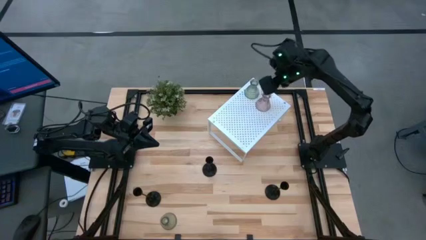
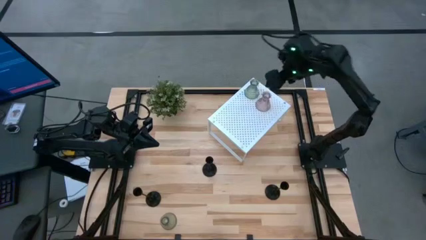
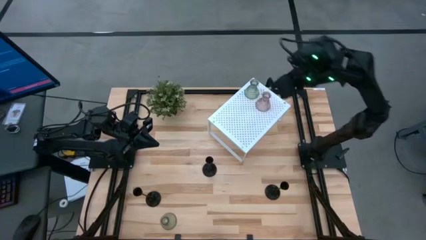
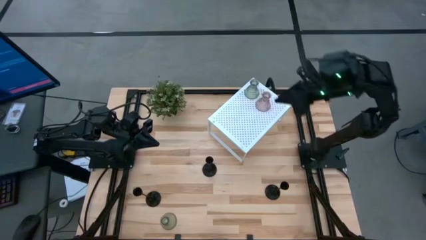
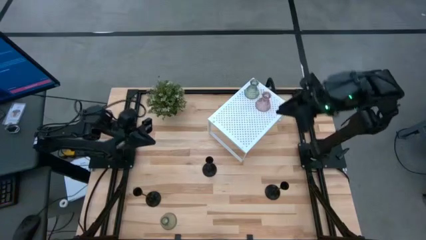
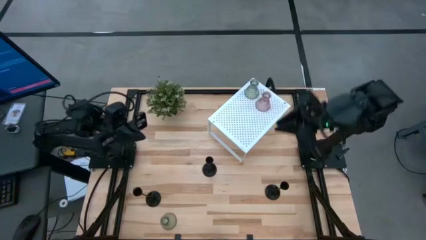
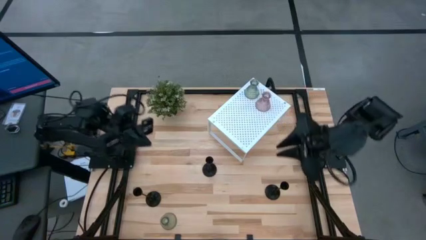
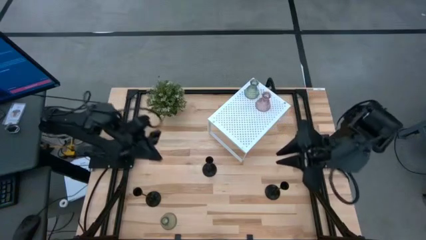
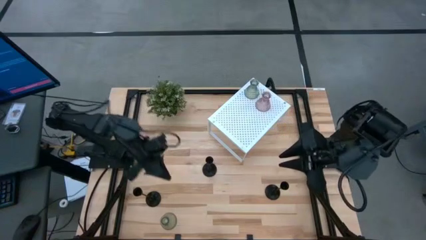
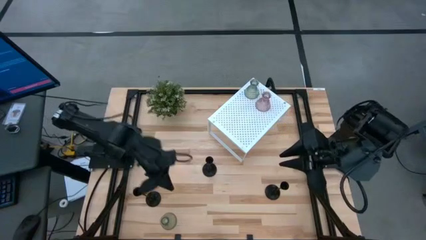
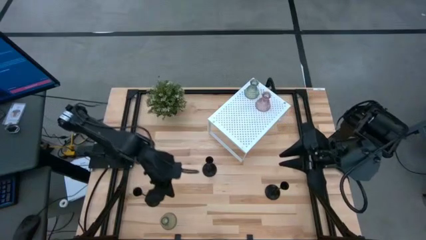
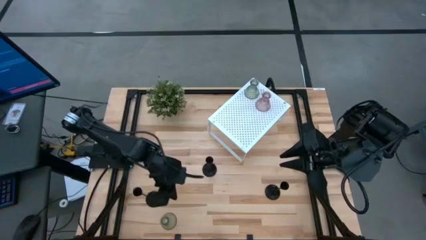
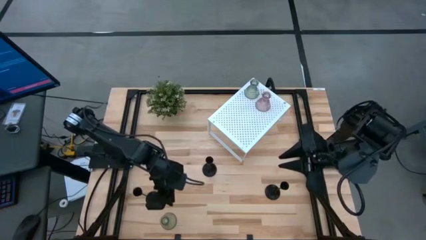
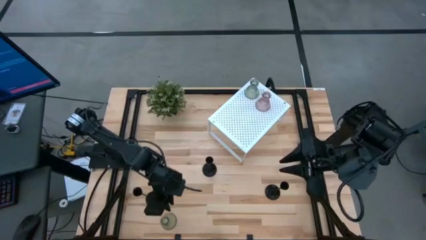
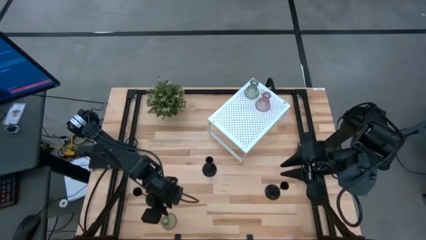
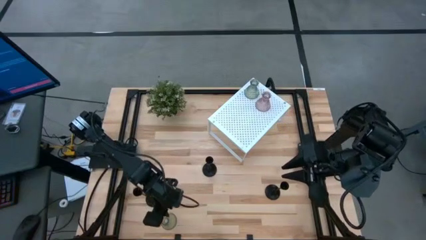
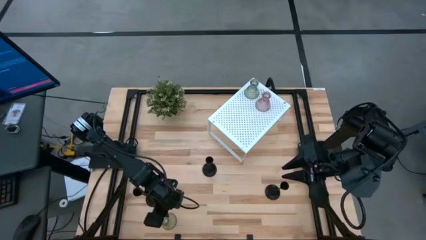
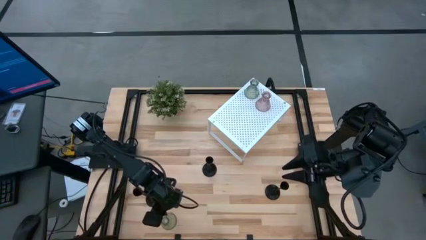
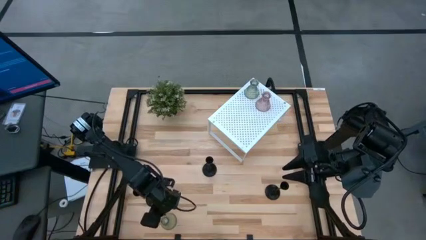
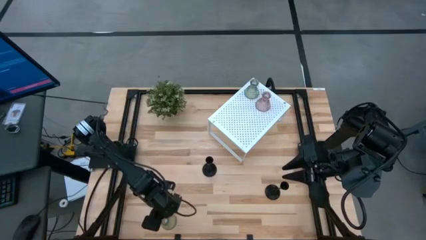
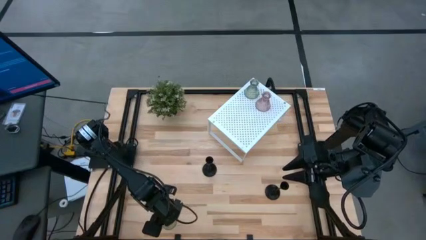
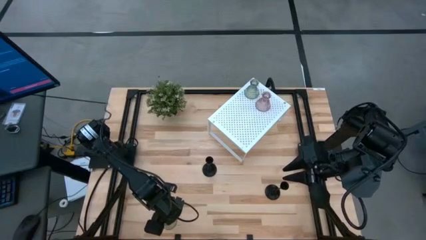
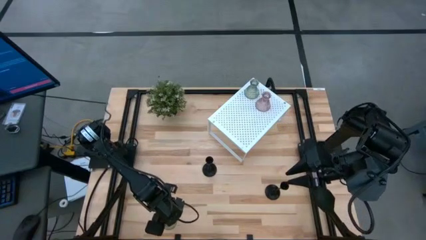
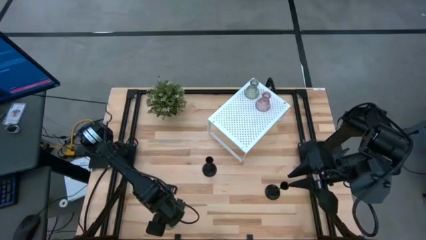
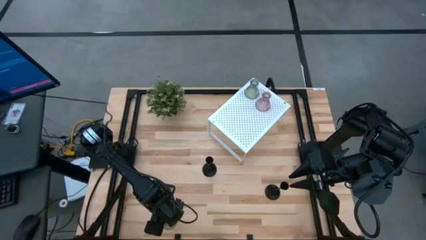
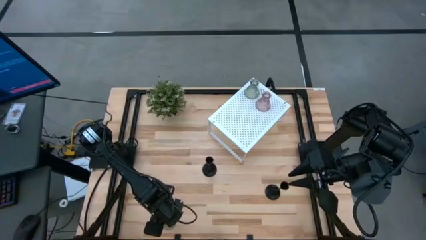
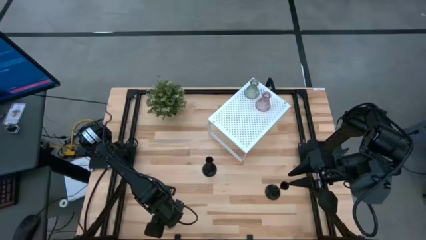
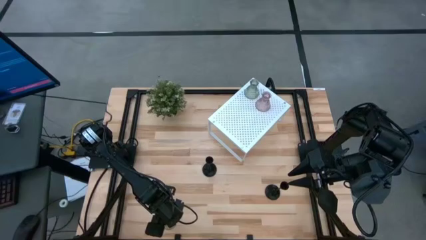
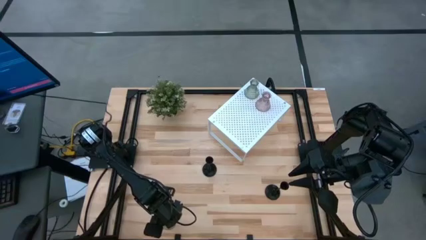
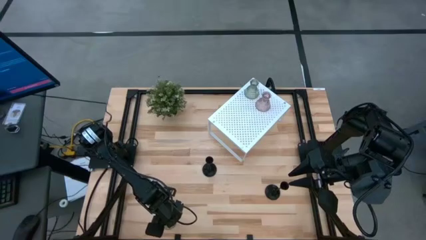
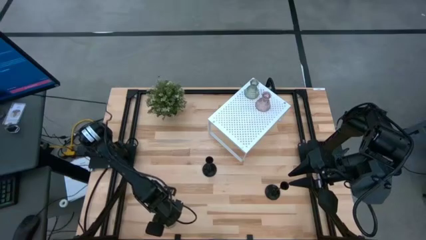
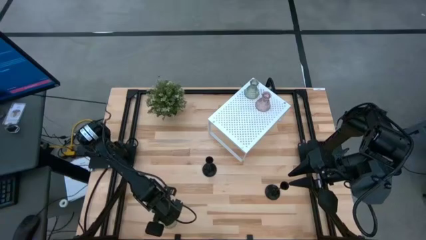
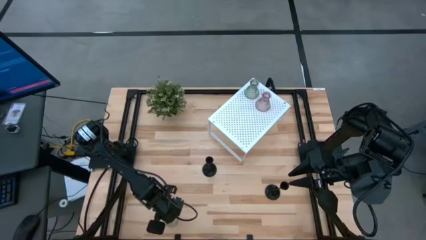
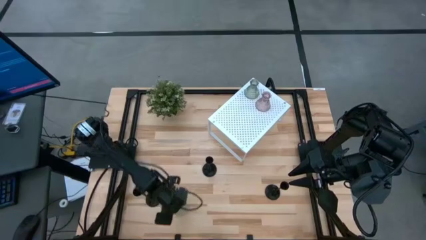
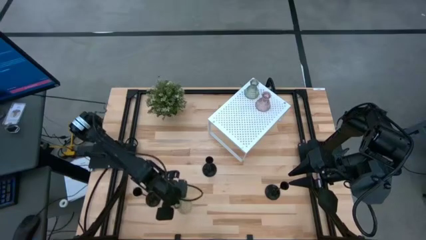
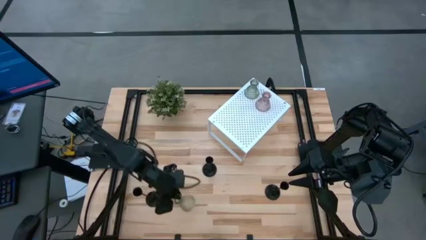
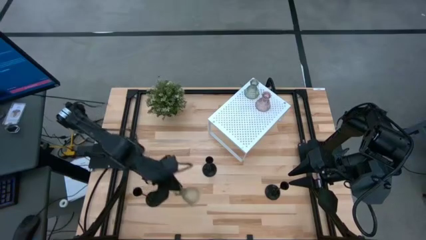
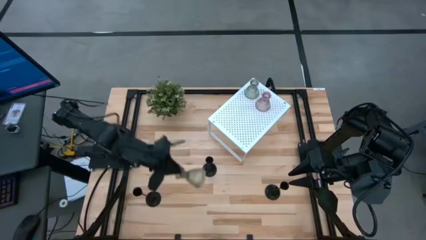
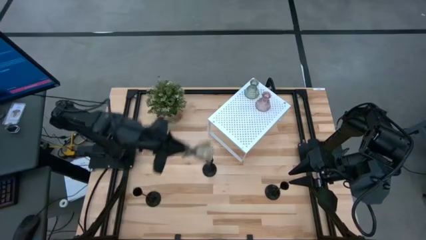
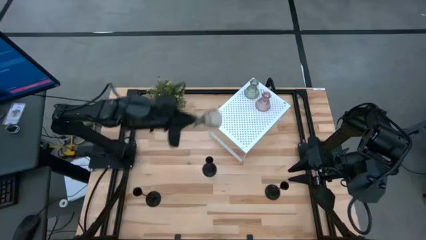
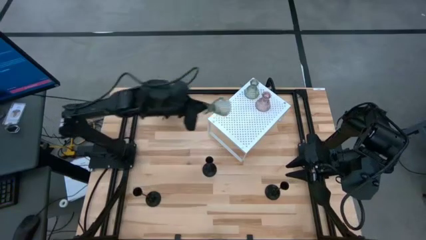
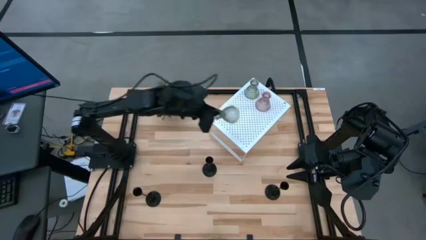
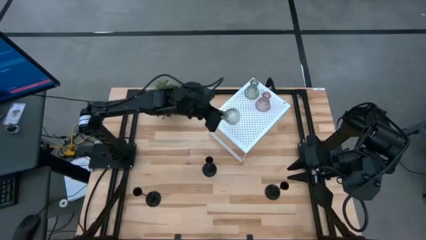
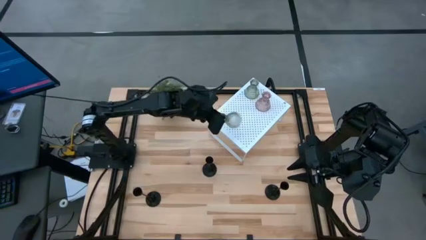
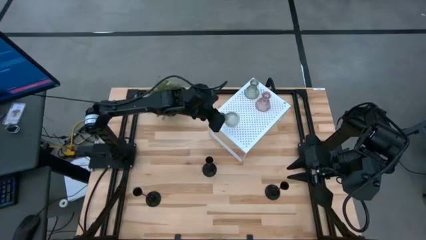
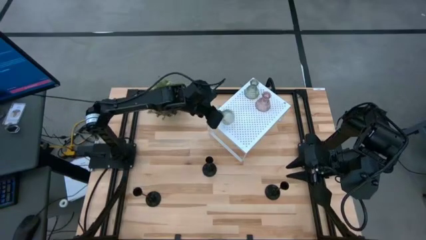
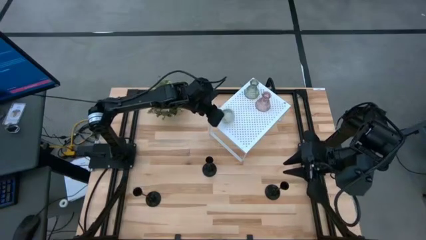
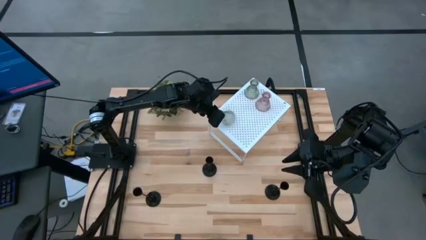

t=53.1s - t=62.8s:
Task: Pick & Place candle stick holders
Put the green glass candle holder on the shelf aligned with the other pink candle holder

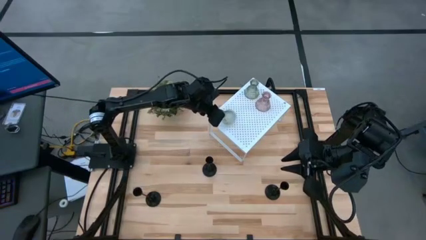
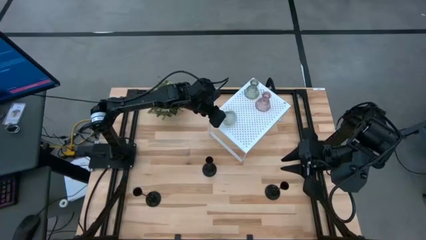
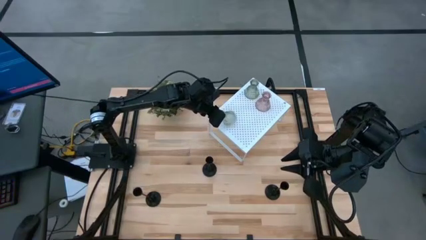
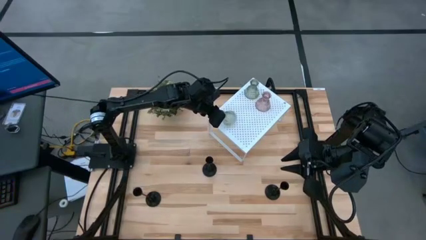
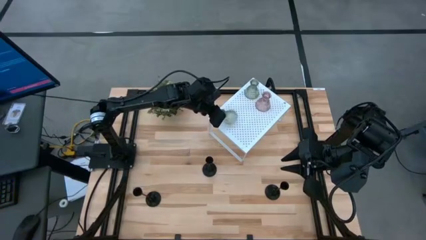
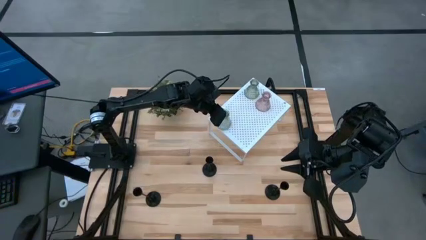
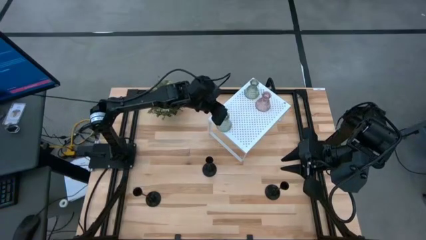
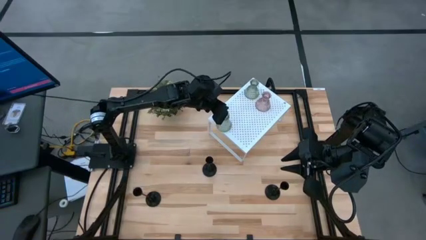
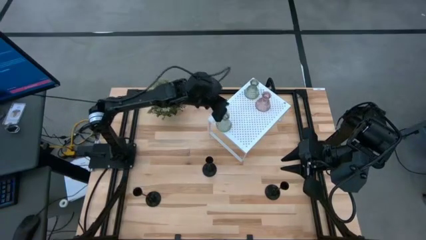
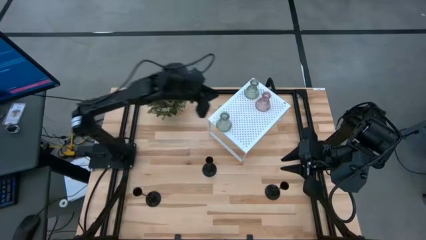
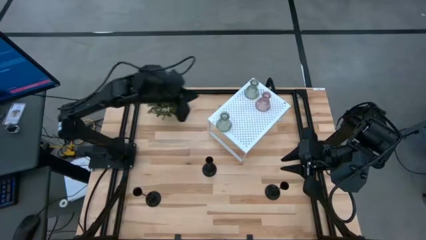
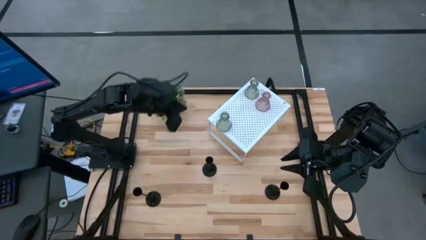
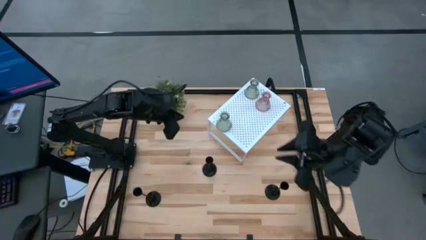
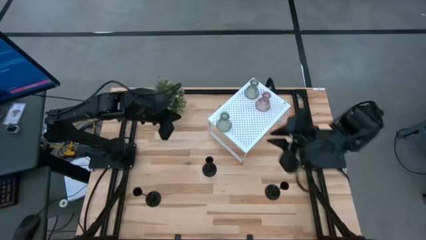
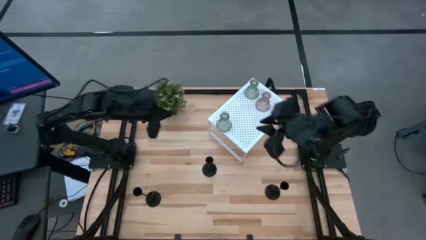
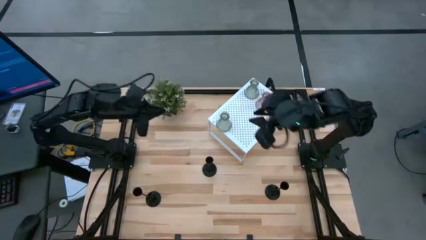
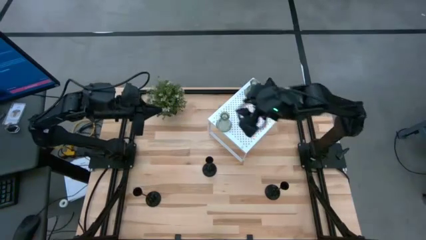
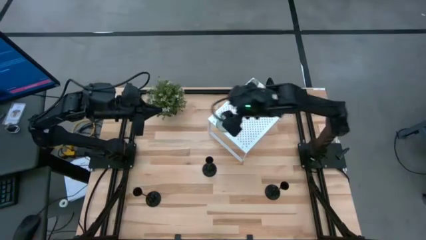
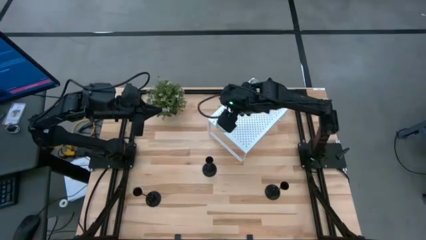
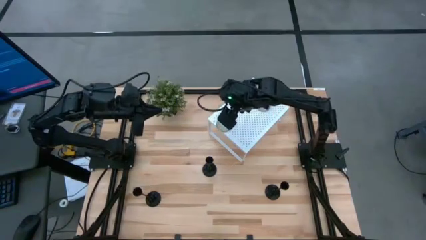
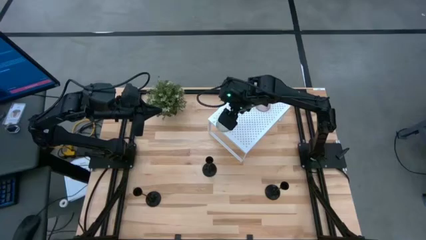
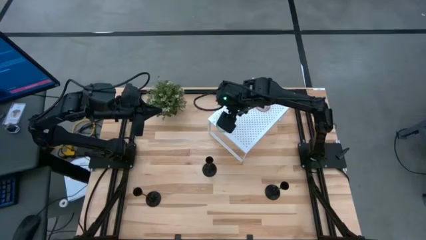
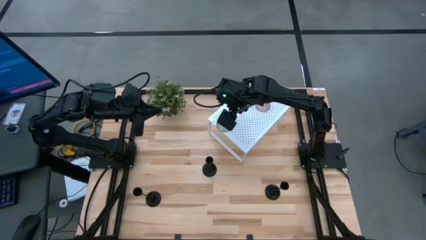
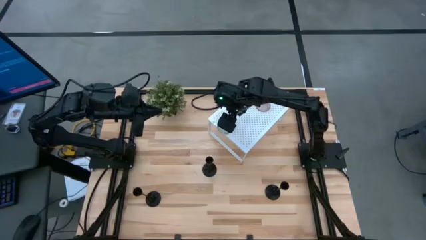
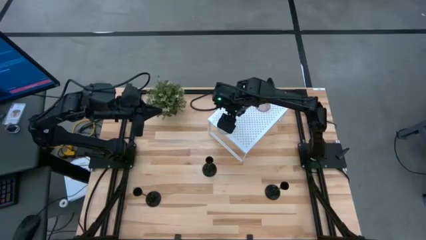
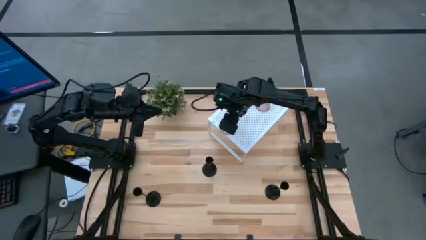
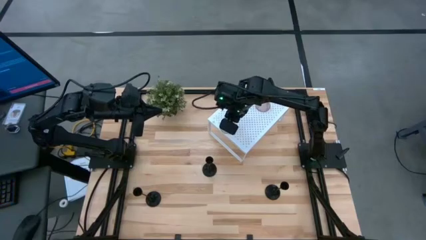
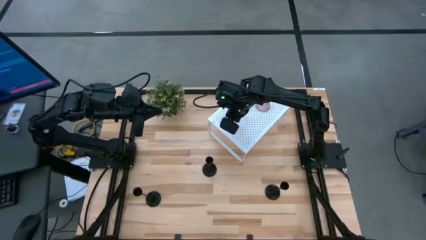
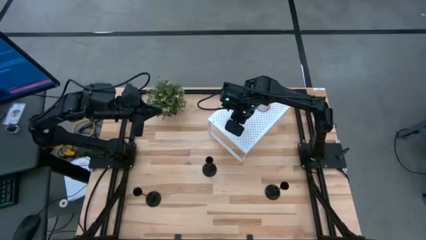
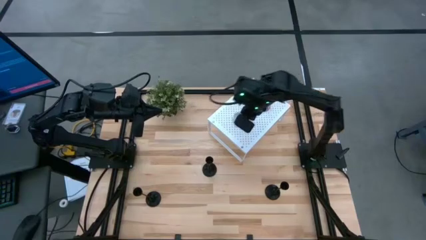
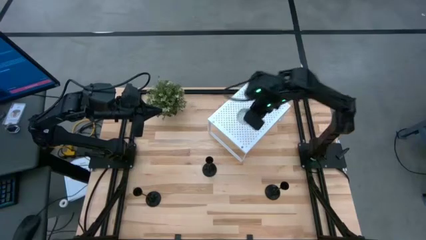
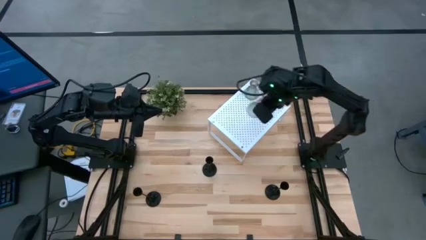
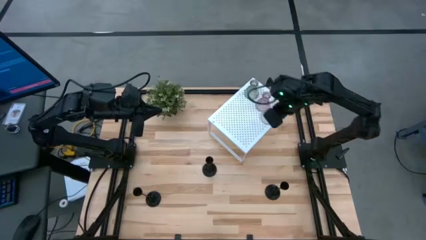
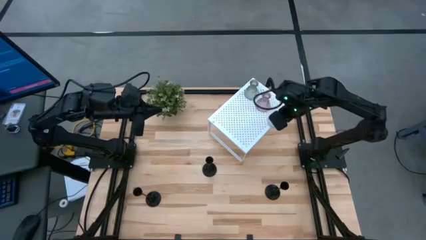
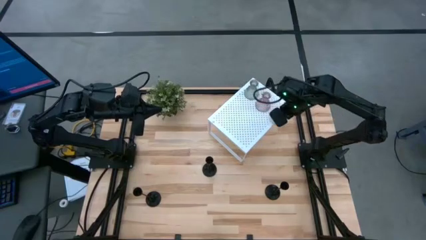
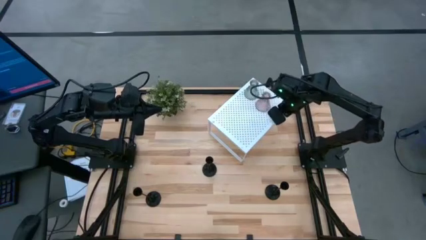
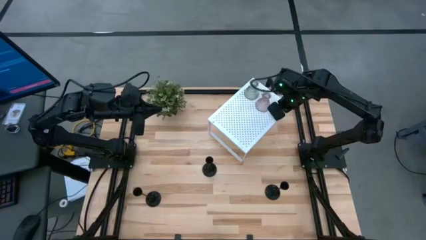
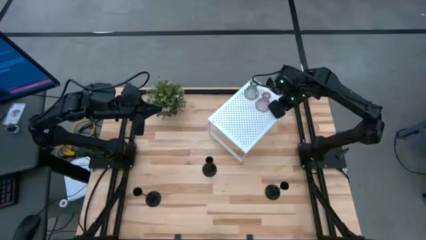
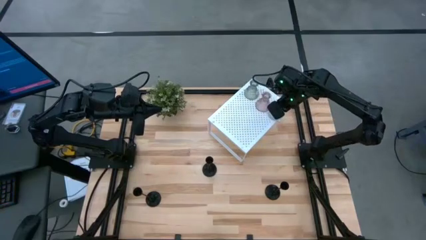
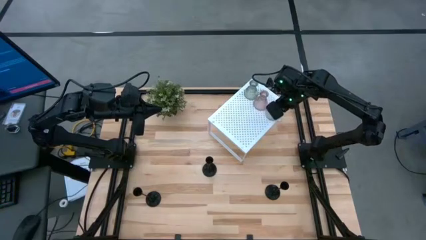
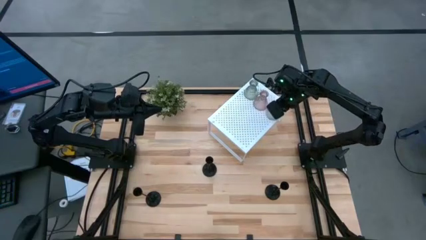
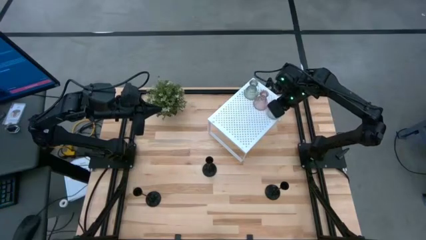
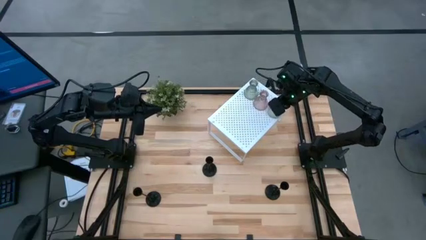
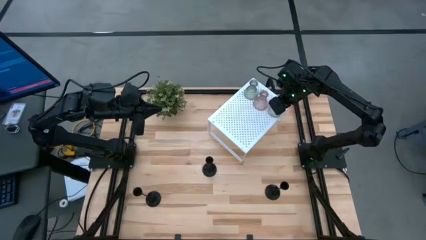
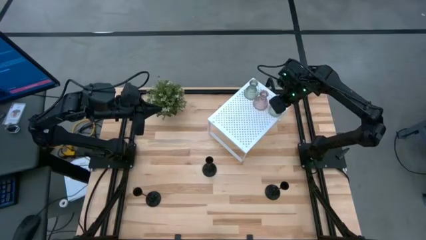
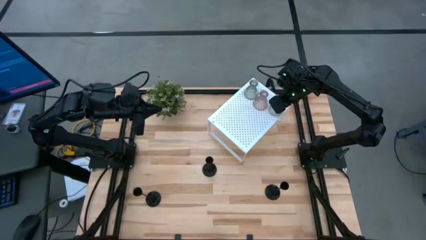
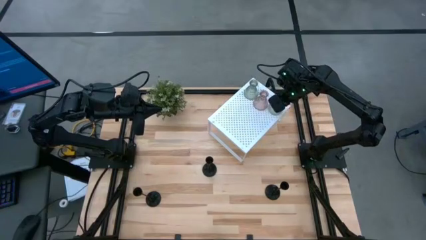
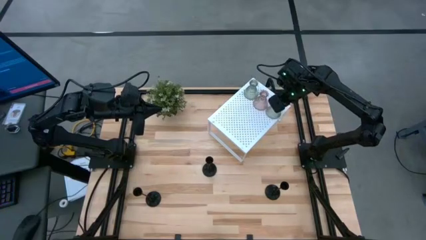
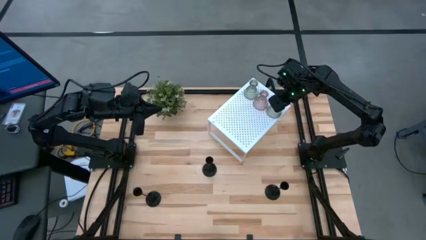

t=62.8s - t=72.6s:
Put the green glass candle holder on the shelf aligned with the other pink candle holder
